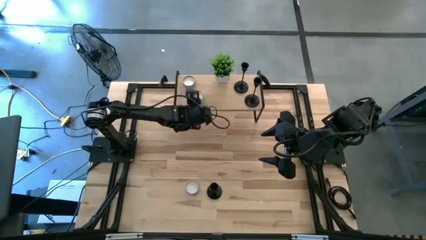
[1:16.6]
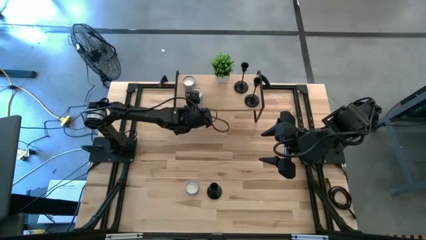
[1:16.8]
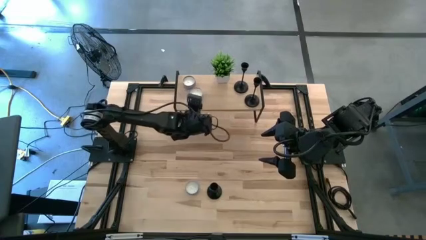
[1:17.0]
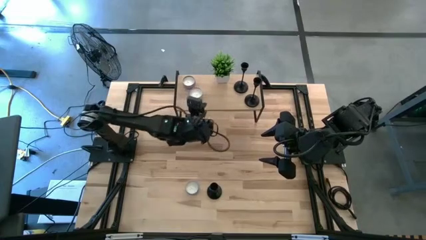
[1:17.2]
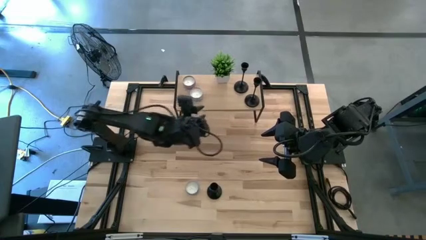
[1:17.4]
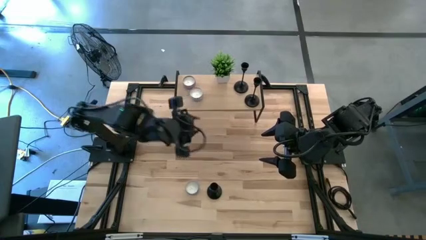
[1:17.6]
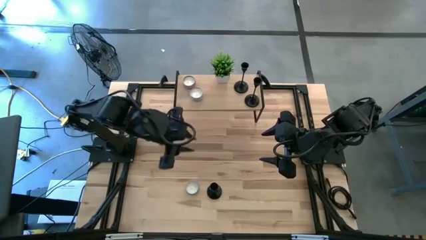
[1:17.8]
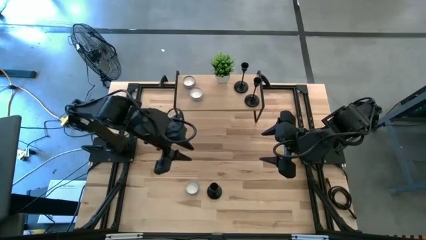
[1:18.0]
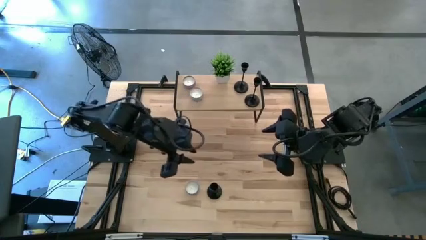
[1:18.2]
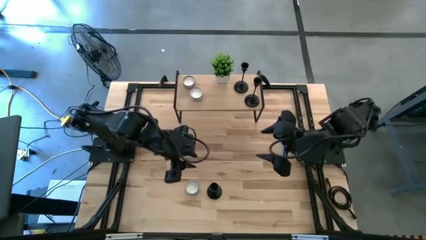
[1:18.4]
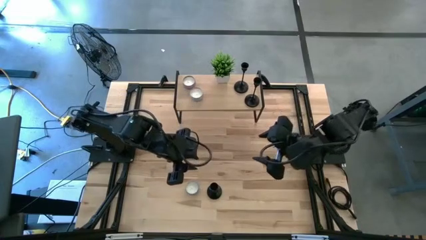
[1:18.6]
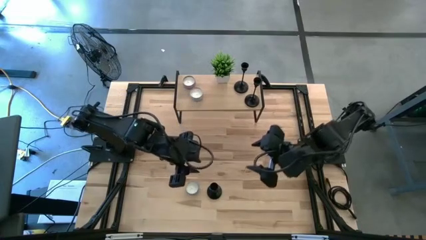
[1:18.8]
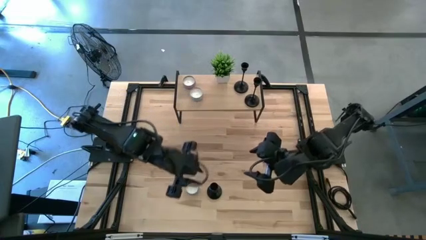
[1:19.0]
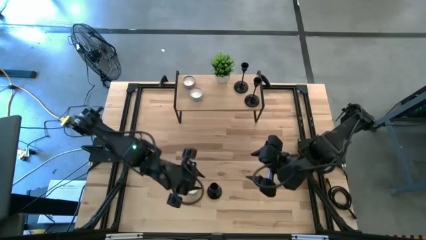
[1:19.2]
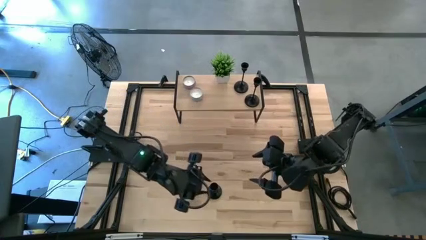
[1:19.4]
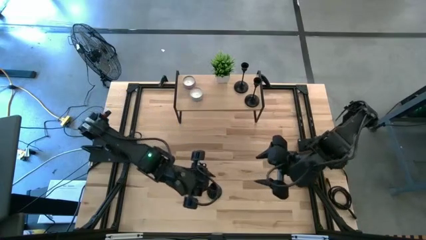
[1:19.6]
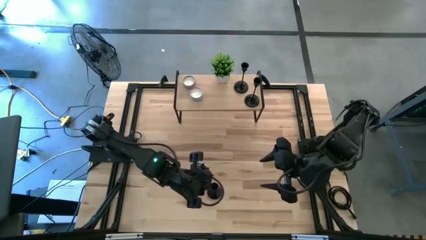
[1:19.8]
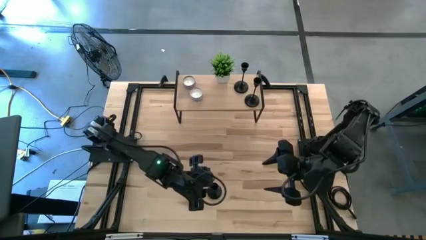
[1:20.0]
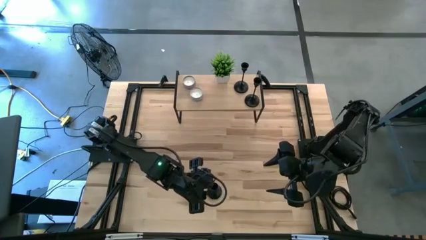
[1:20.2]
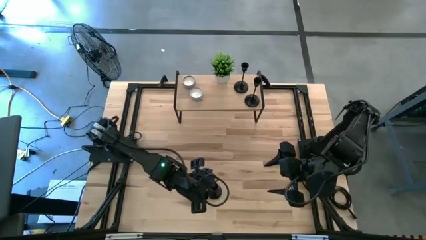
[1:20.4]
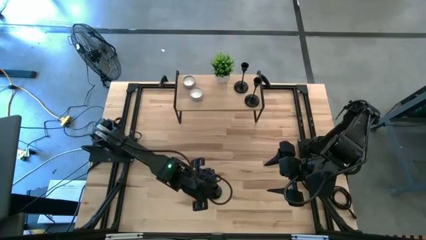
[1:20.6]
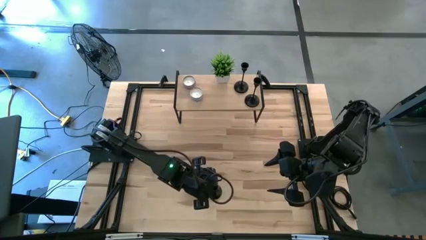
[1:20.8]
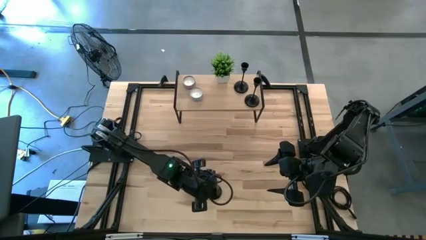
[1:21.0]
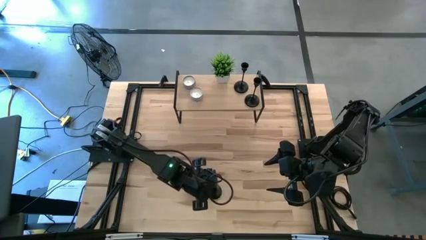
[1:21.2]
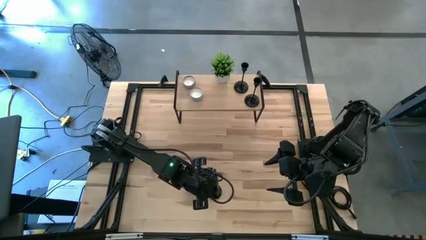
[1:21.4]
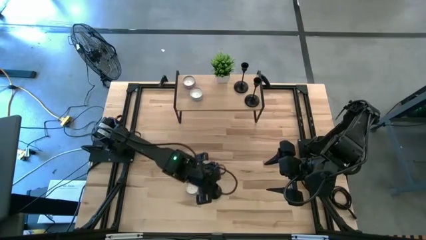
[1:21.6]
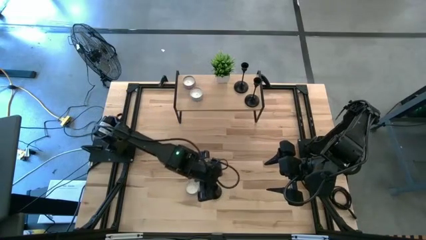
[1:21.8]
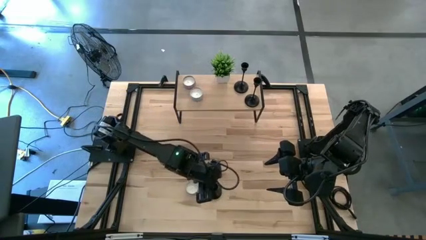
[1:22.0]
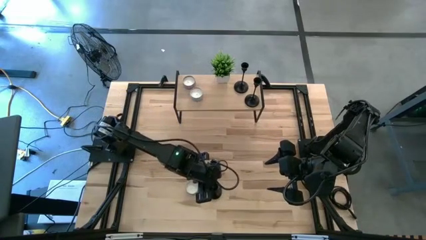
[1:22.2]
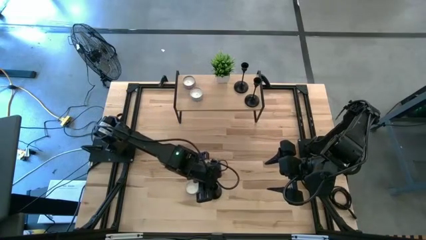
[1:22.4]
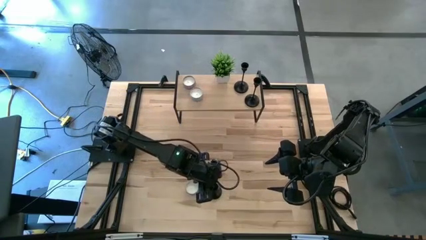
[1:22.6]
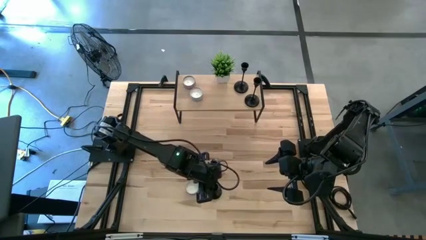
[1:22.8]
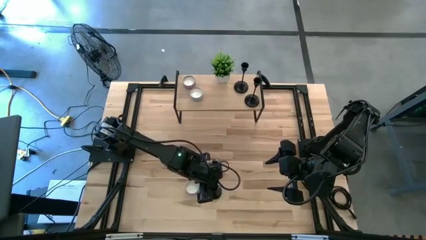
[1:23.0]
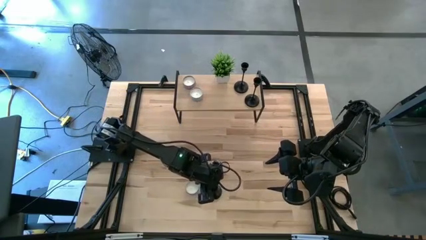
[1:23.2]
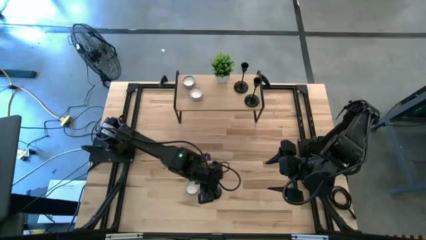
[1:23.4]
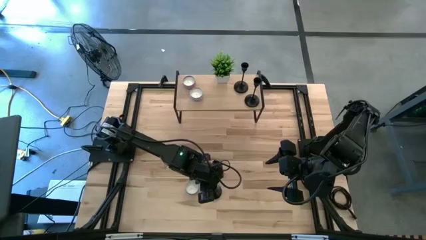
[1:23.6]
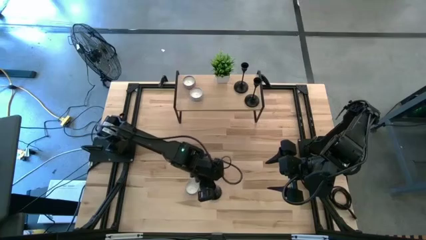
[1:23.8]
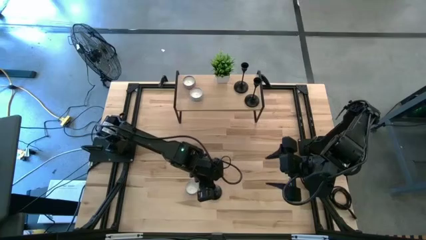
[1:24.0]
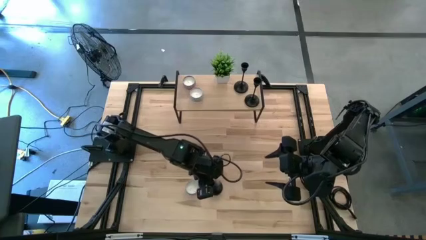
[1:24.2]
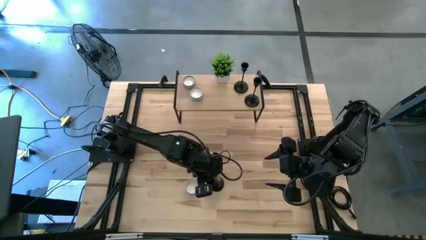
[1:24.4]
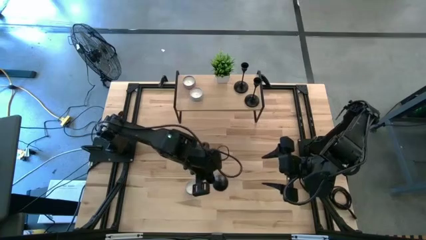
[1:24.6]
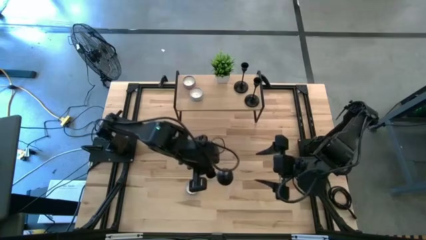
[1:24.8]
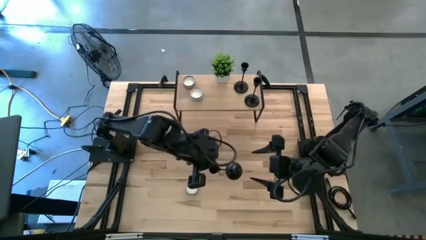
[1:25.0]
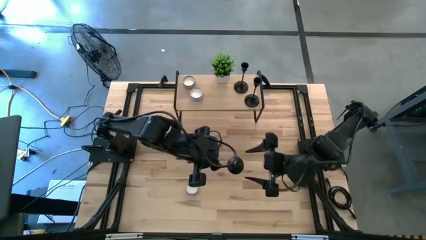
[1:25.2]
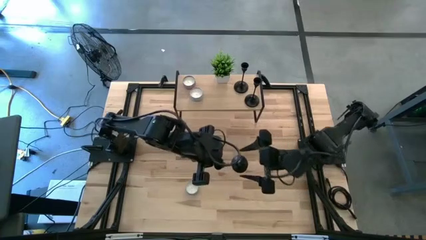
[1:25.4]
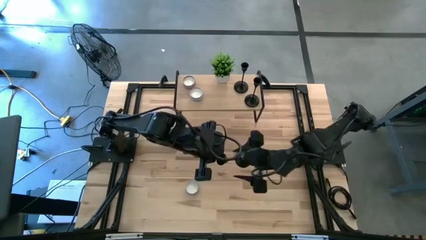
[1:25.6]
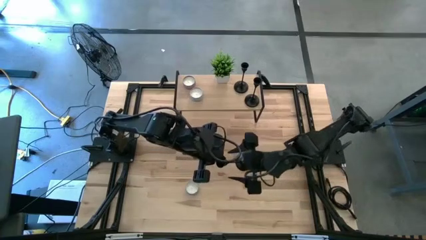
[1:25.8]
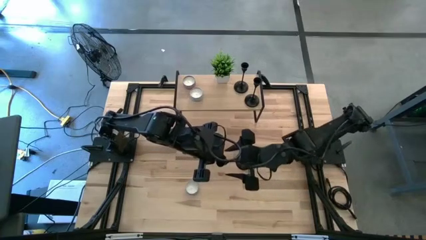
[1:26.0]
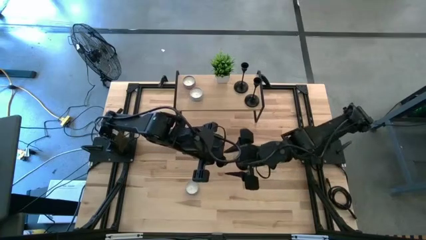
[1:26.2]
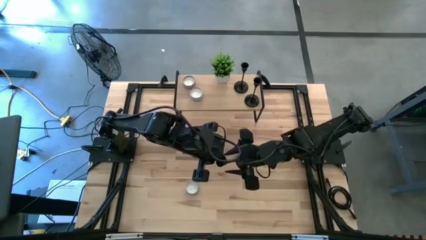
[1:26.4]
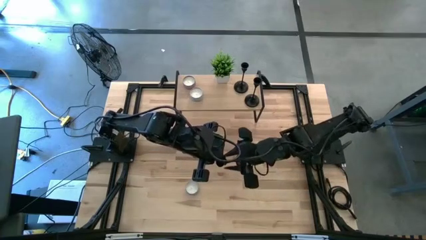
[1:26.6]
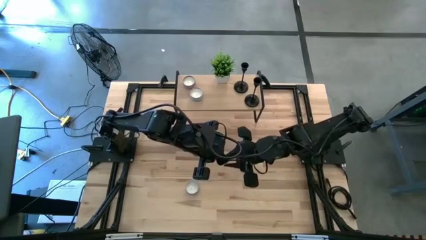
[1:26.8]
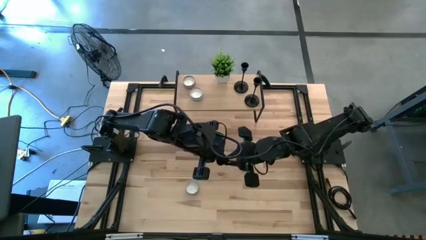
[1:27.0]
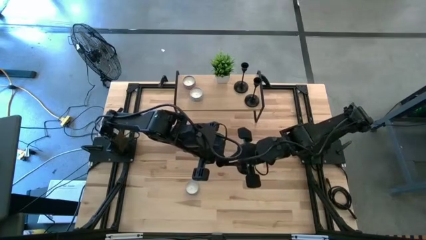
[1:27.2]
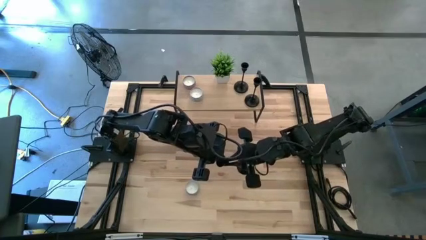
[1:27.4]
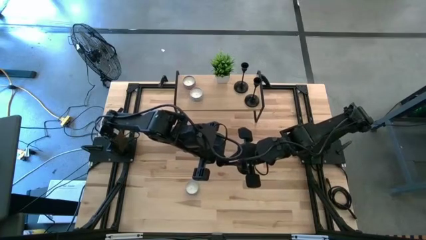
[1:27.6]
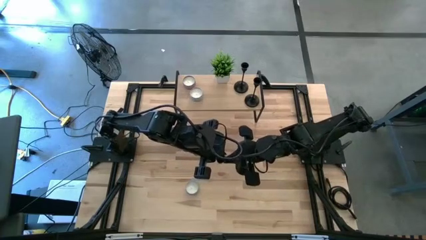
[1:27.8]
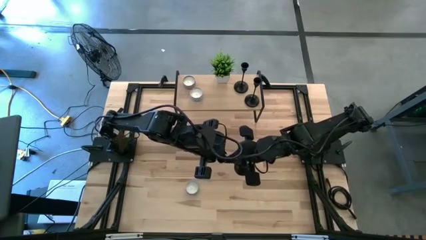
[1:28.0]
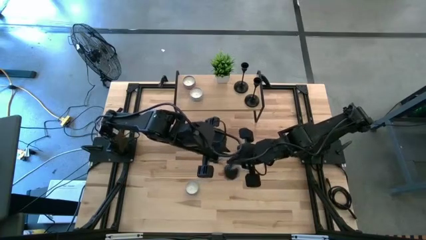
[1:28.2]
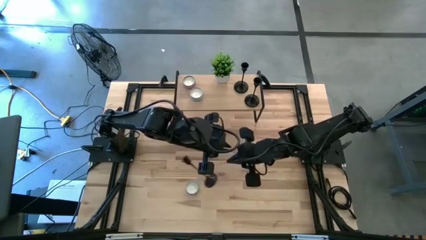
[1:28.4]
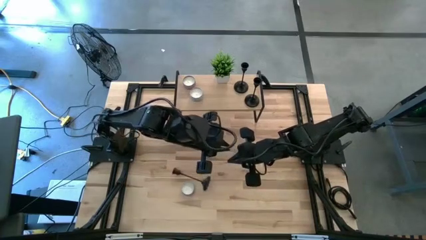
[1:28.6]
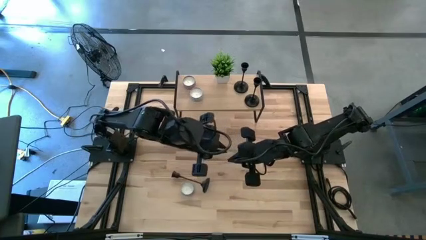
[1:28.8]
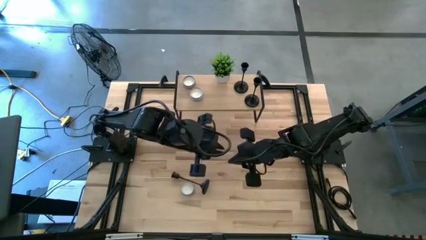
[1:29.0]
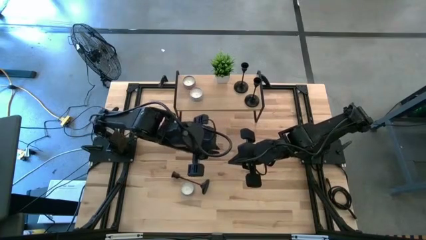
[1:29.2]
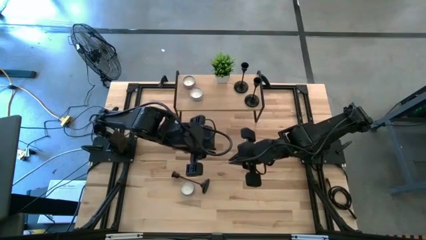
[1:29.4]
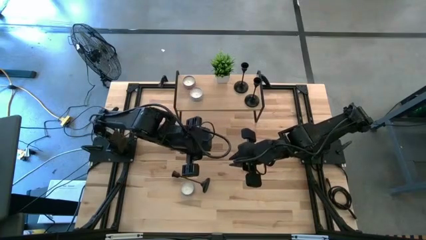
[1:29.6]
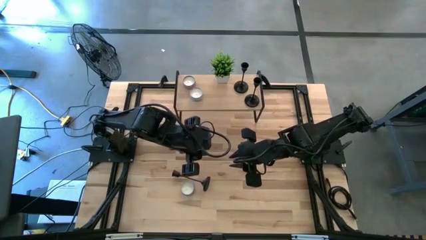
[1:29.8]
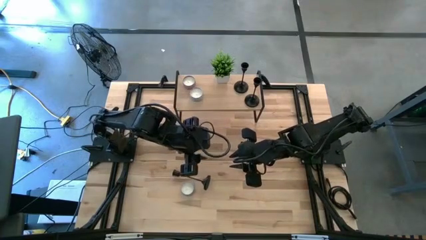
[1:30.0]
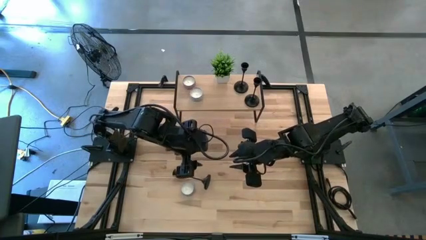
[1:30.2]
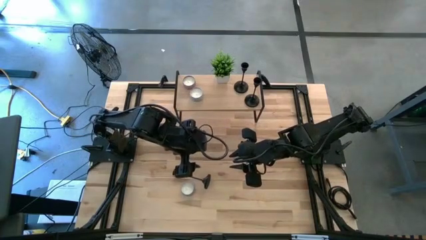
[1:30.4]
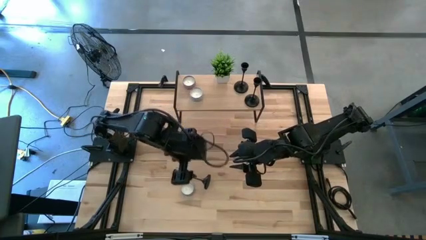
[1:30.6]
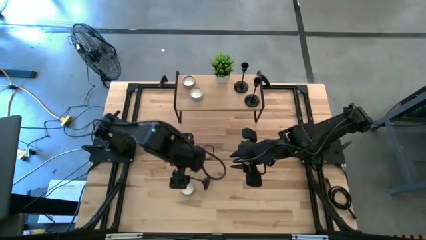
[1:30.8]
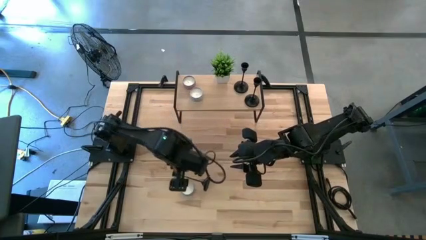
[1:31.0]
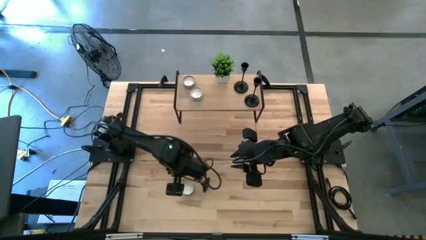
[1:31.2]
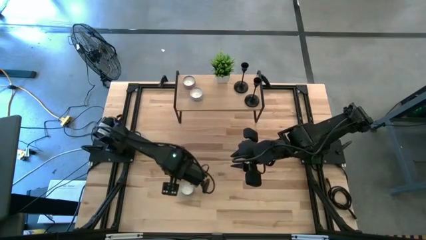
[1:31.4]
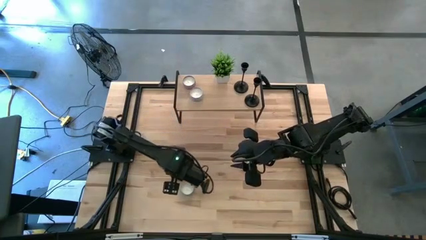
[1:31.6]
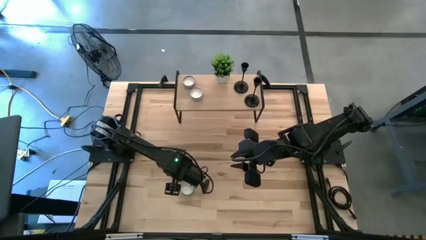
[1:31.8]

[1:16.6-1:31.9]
Task: Pick & Place candle stick holders
Put the black candle holder on the shelf
